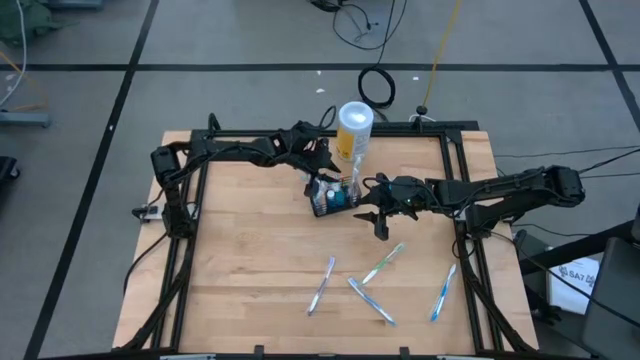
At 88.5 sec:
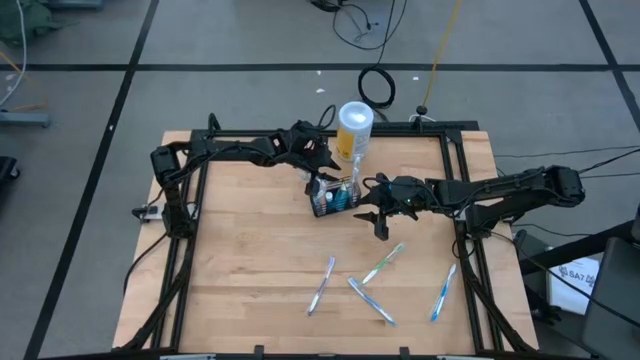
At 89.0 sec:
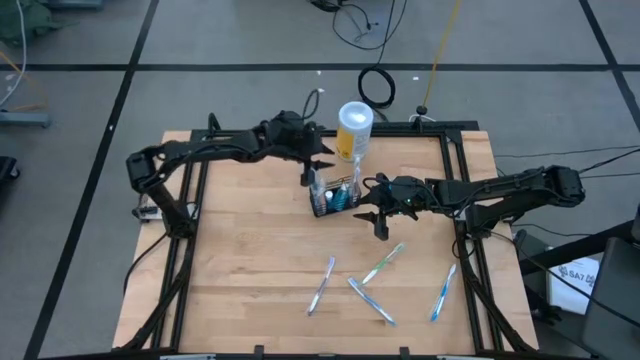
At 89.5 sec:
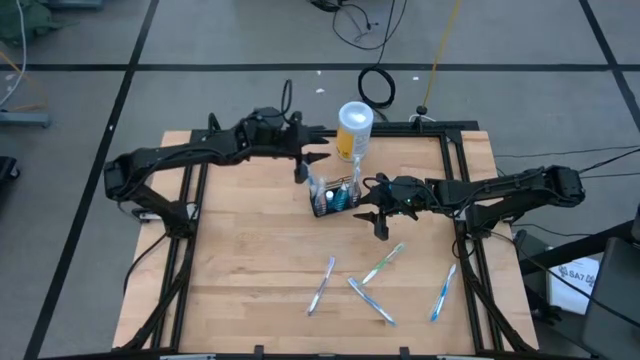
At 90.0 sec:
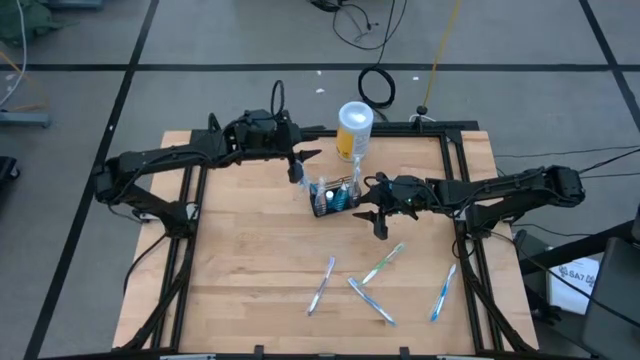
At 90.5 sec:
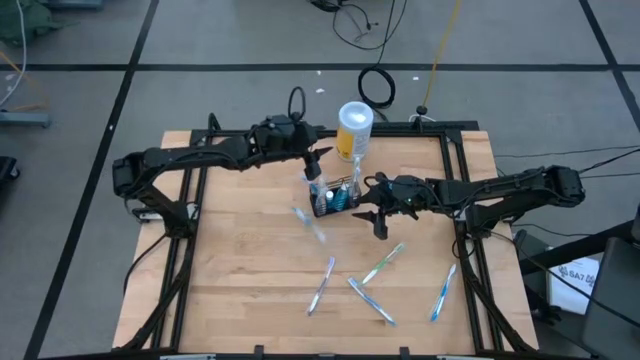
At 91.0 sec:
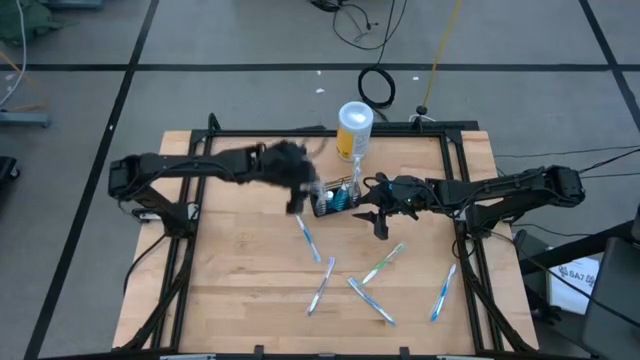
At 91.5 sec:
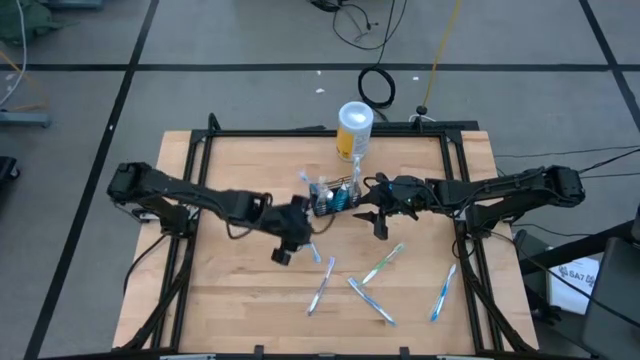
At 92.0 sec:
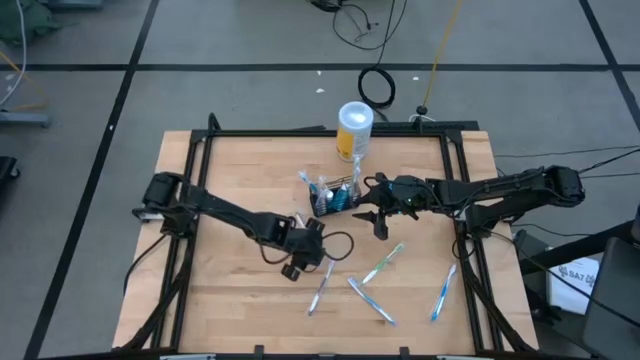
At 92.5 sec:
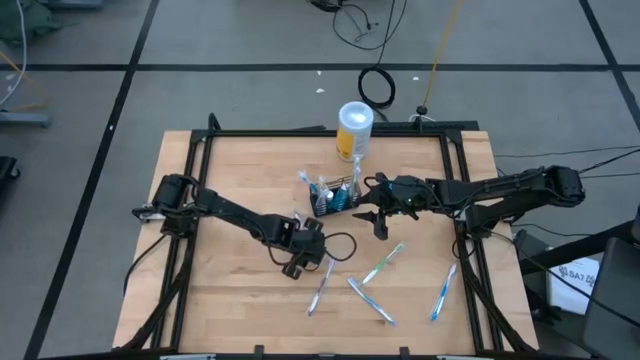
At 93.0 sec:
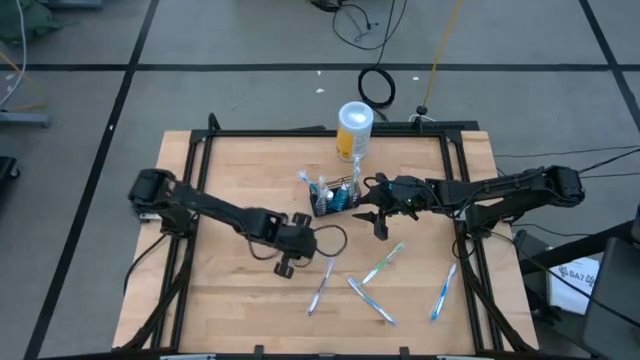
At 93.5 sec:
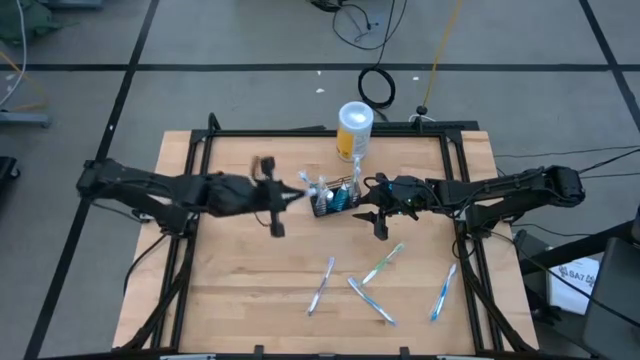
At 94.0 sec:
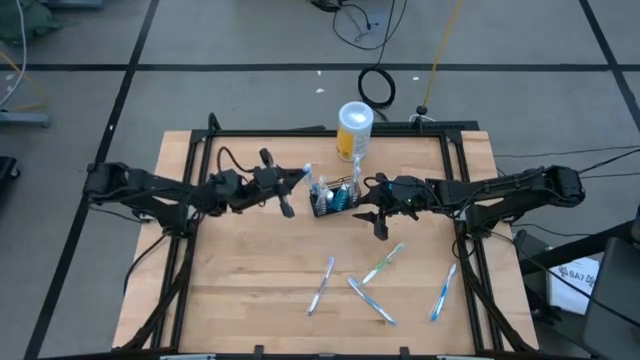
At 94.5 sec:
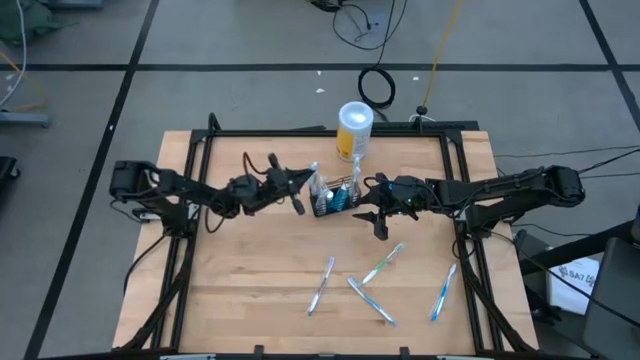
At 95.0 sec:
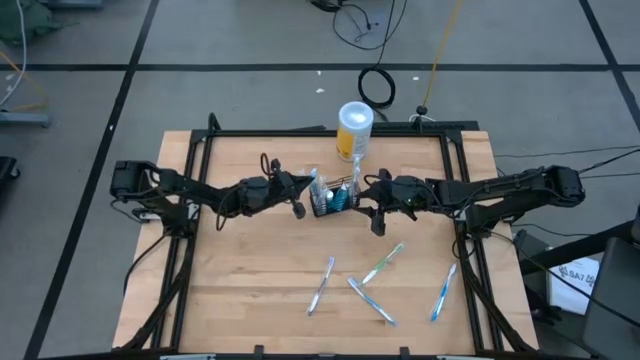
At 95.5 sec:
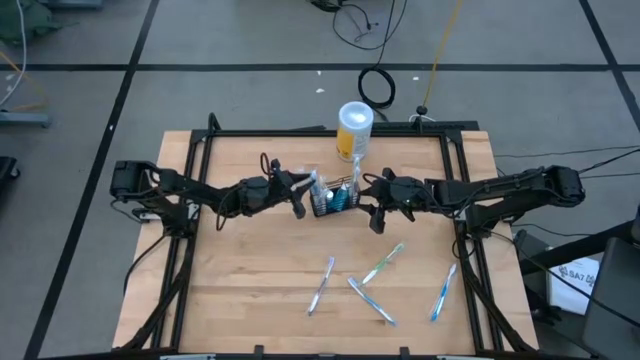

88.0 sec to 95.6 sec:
Task: Pick & Place toothbrushing station
Put the blue toothbrush into the black wire organizer

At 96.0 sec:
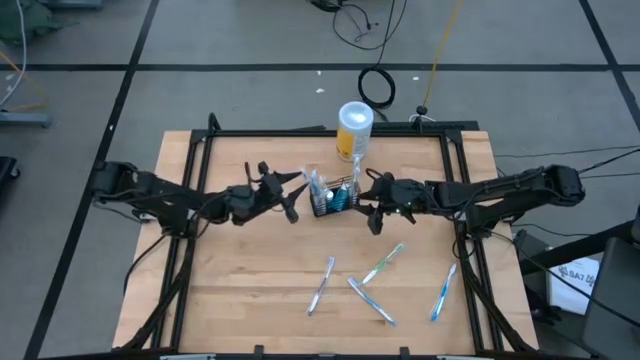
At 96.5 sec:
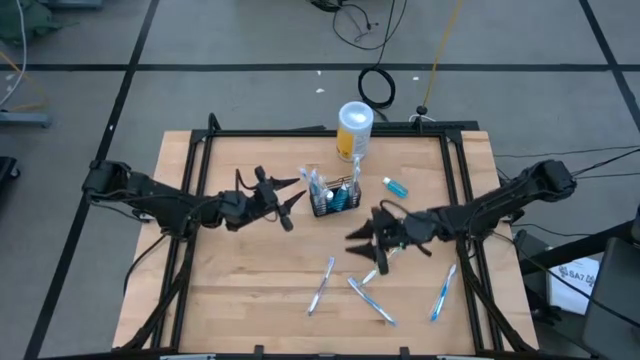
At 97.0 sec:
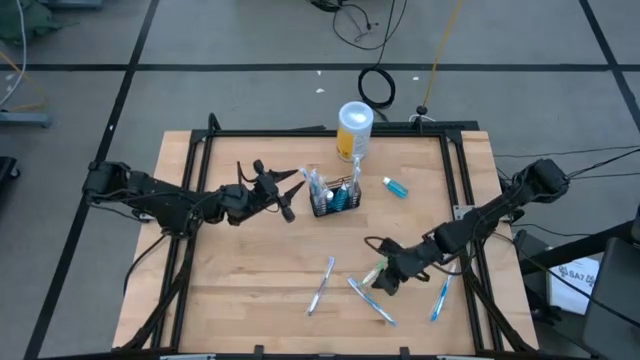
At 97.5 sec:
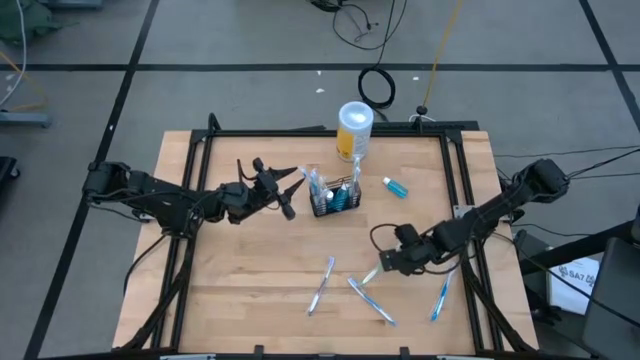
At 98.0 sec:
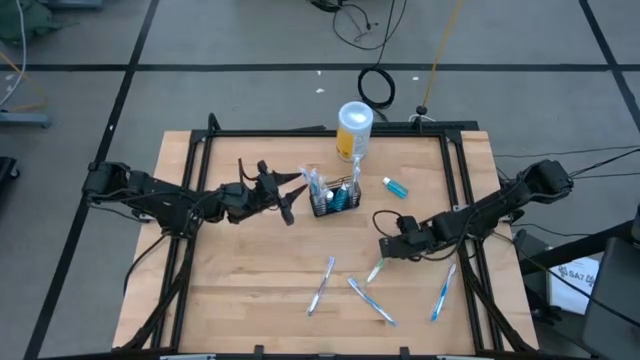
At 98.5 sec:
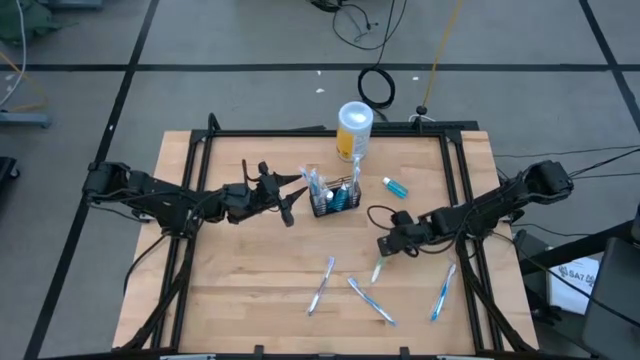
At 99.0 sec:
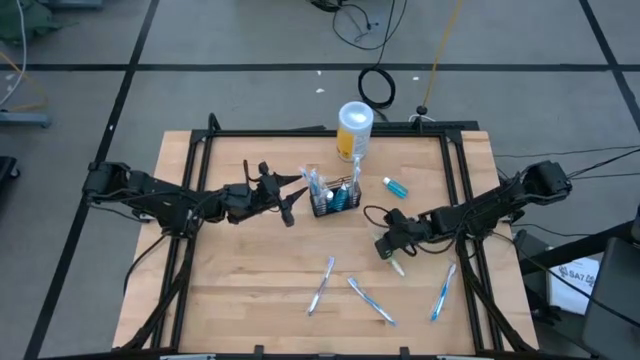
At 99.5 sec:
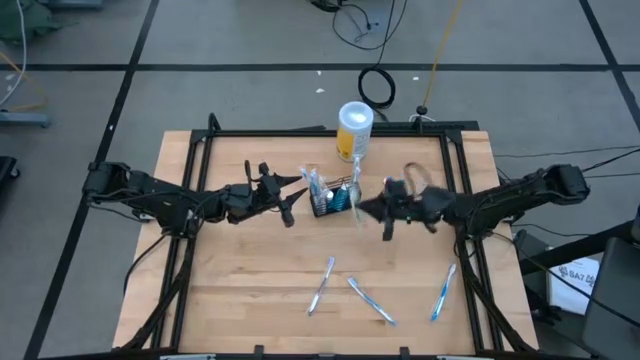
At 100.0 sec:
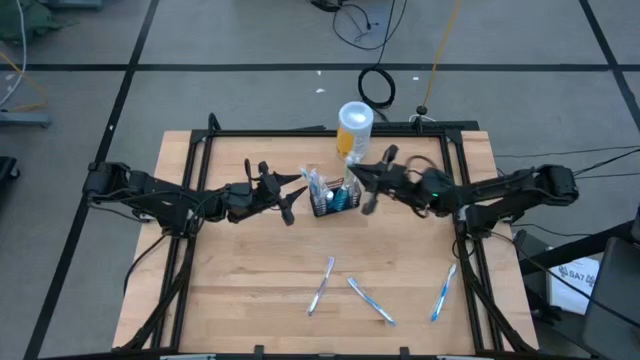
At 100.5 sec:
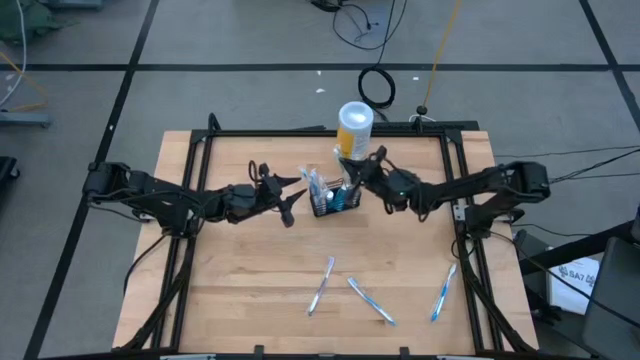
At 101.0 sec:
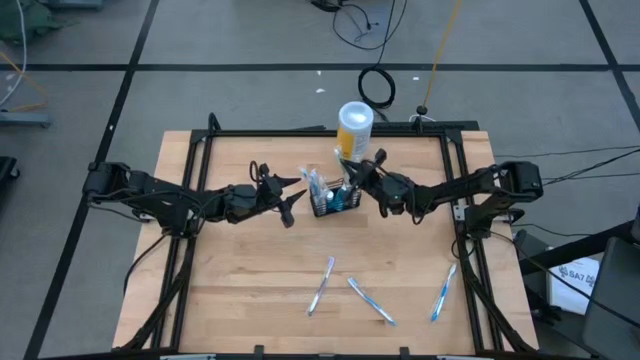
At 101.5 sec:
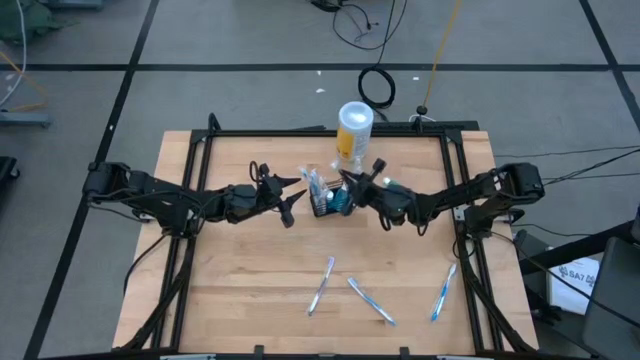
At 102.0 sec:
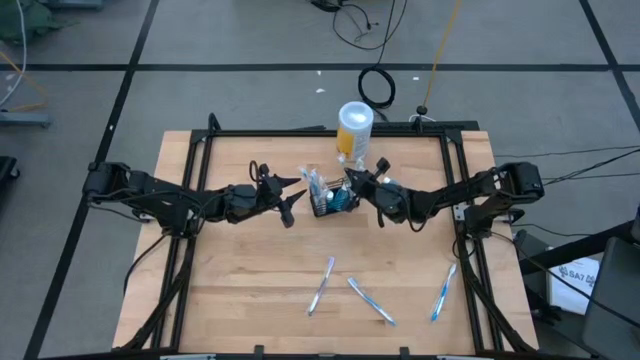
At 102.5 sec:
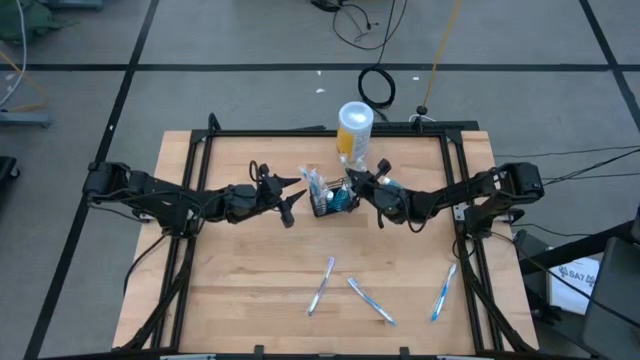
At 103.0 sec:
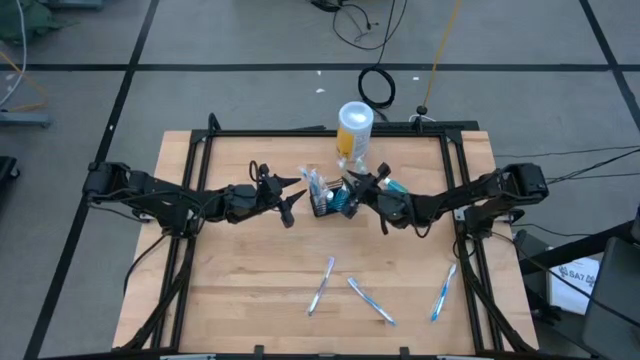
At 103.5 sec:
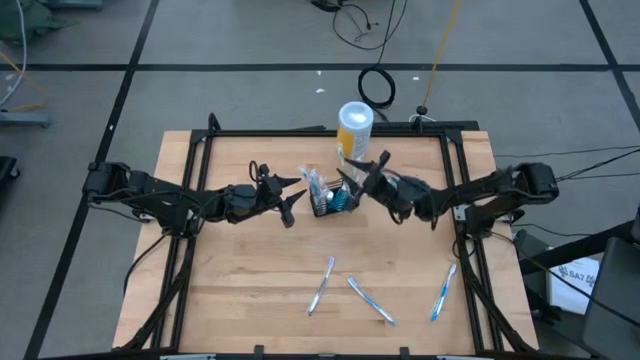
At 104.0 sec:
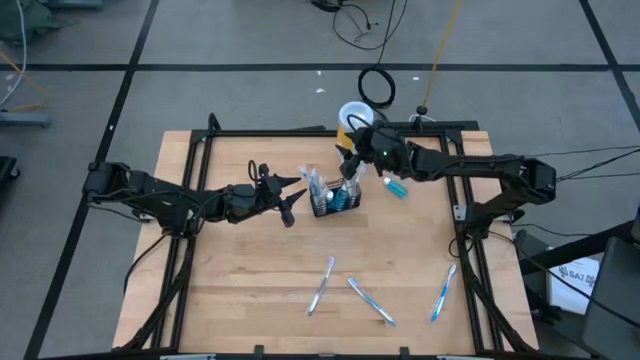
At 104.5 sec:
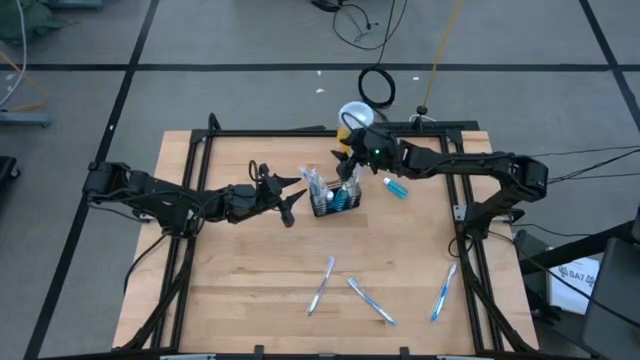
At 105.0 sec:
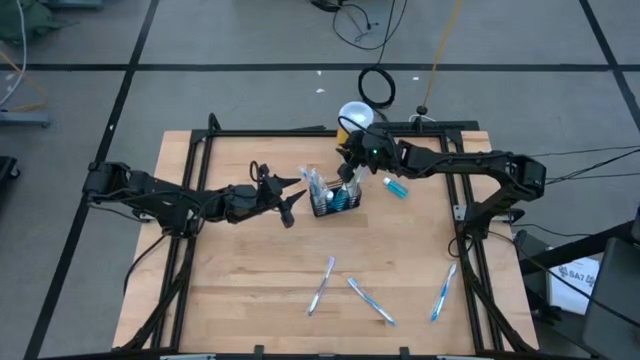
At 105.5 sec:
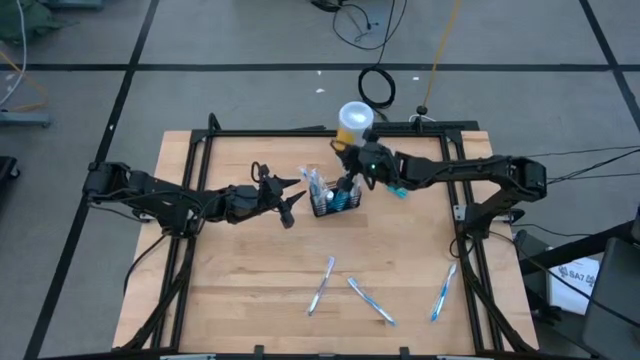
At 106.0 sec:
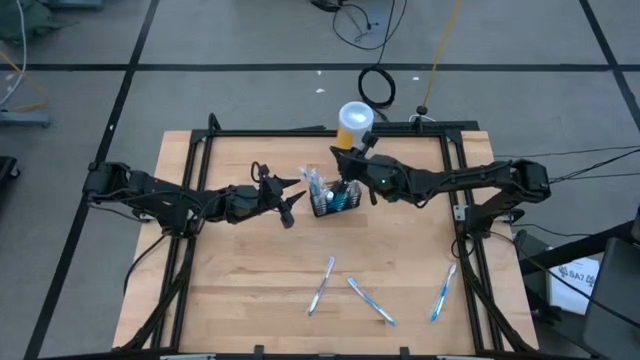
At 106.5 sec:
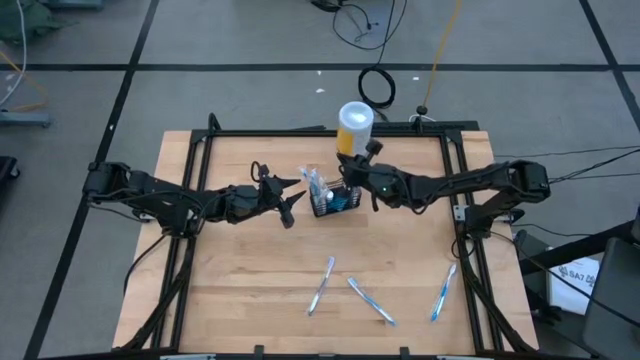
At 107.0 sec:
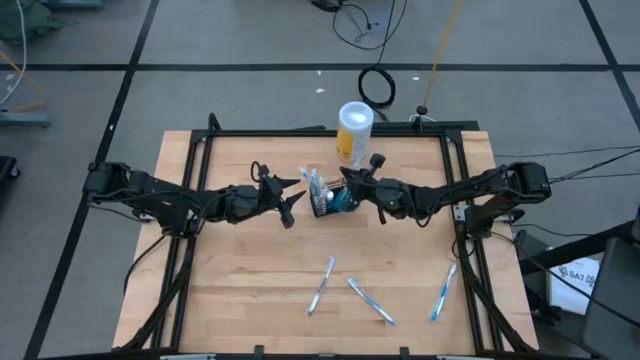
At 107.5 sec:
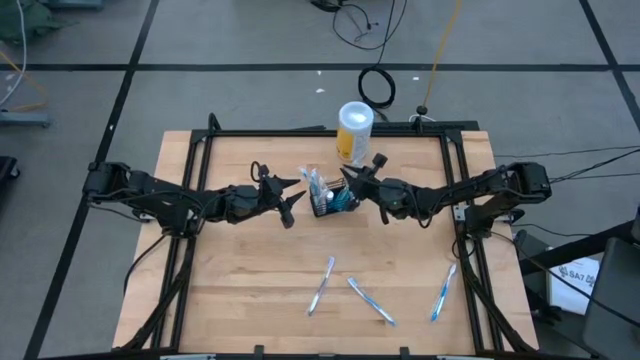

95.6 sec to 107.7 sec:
Put the green toothbrush into the black wire organizer

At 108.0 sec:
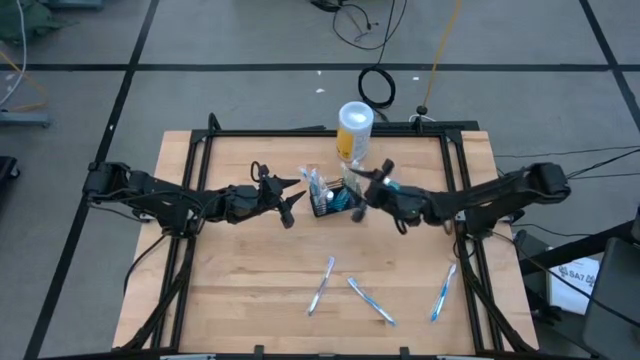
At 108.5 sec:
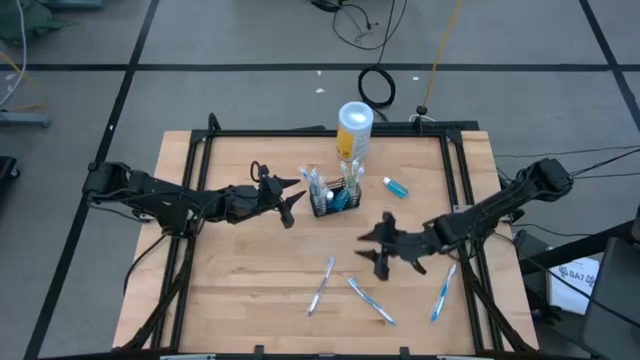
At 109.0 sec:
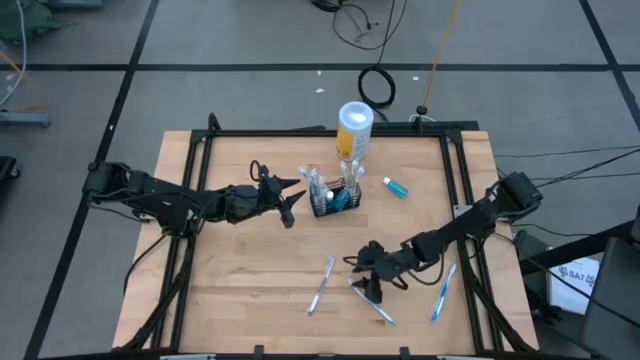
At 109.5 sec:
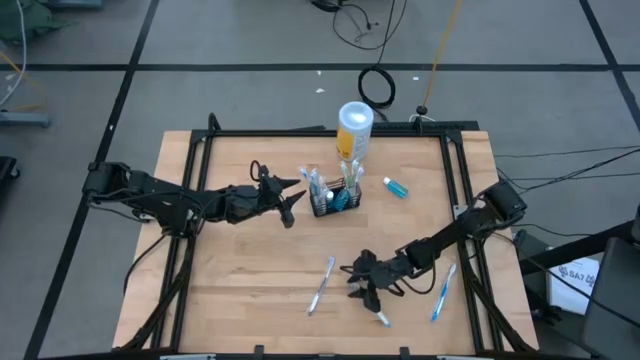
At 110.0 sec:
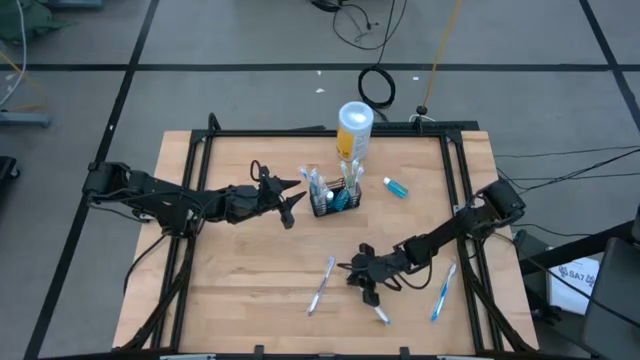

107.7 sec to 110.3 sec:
Put the blue toothbrush into the black wire organizer
